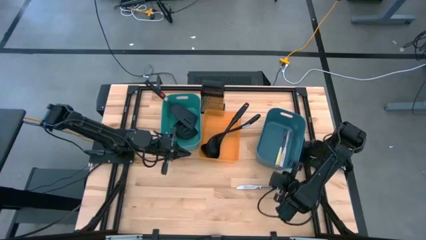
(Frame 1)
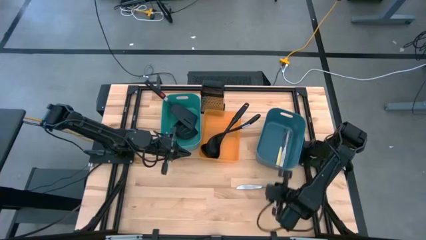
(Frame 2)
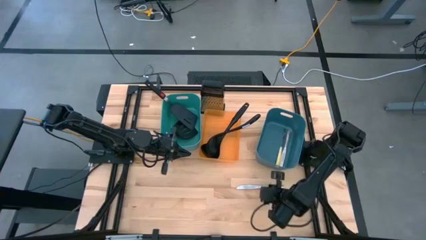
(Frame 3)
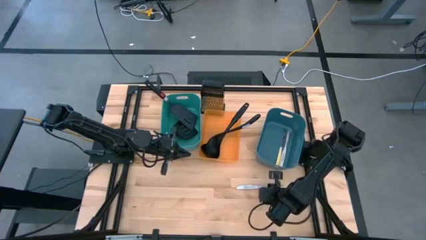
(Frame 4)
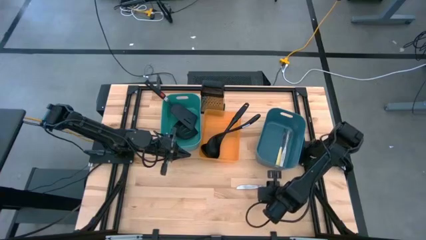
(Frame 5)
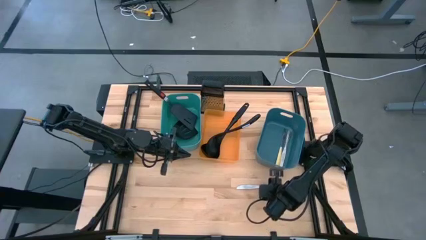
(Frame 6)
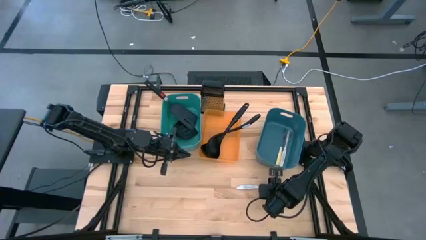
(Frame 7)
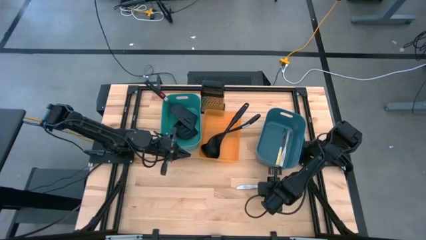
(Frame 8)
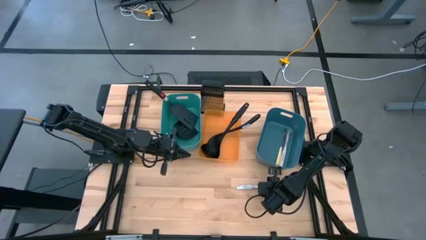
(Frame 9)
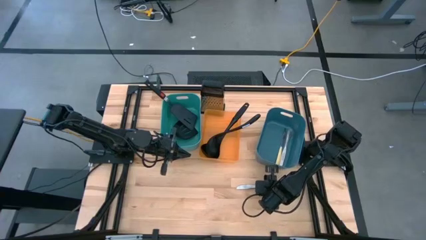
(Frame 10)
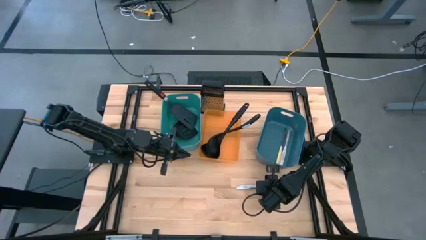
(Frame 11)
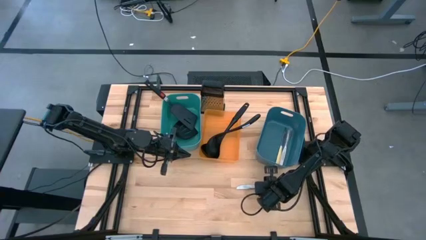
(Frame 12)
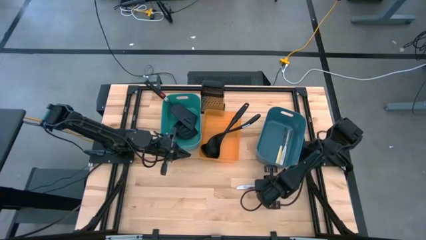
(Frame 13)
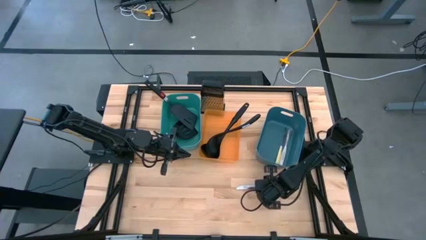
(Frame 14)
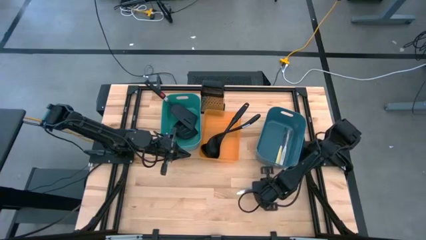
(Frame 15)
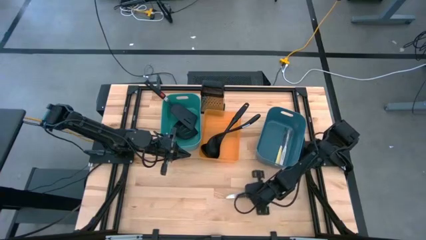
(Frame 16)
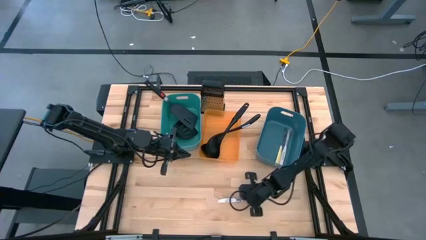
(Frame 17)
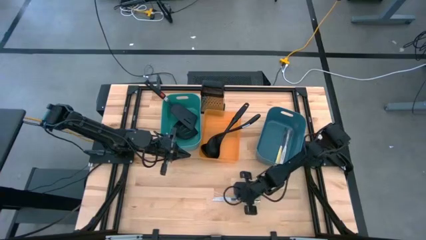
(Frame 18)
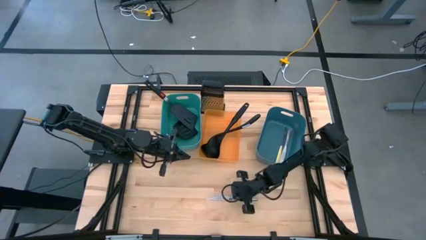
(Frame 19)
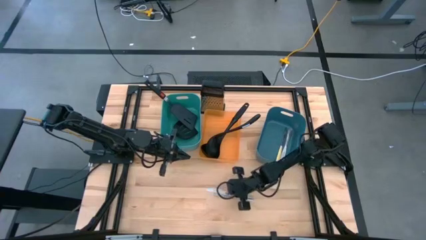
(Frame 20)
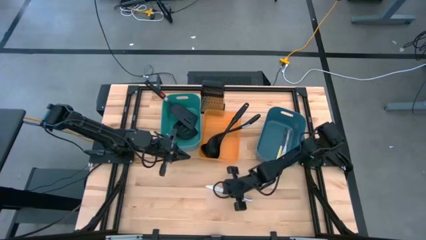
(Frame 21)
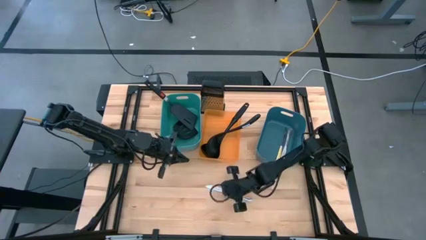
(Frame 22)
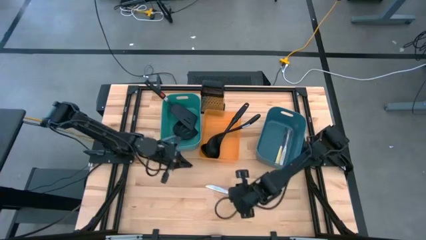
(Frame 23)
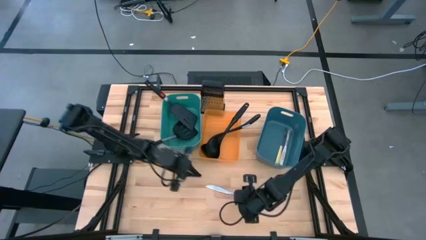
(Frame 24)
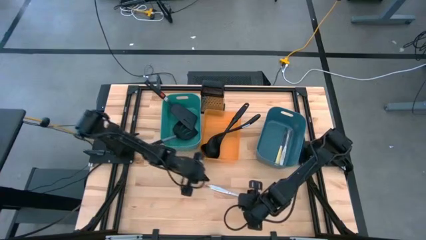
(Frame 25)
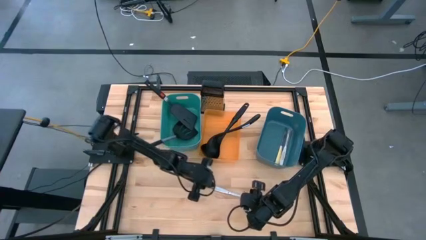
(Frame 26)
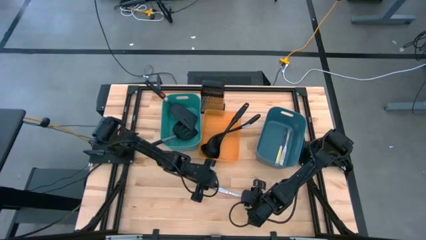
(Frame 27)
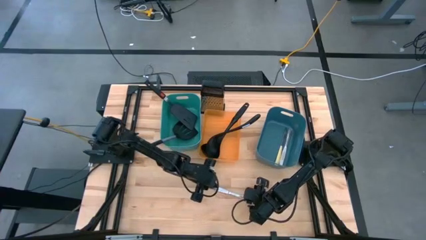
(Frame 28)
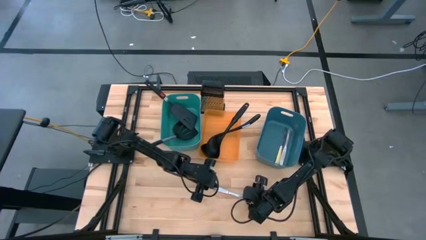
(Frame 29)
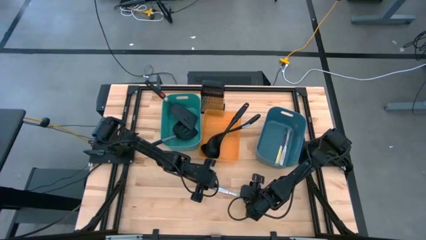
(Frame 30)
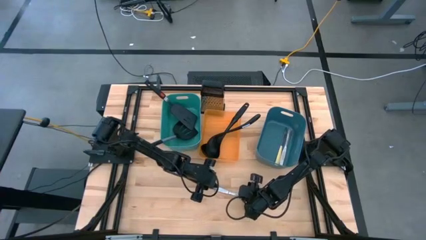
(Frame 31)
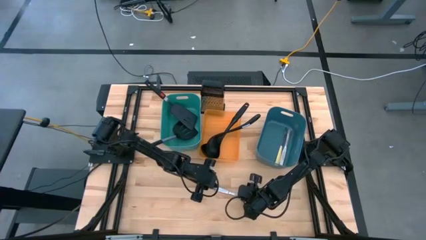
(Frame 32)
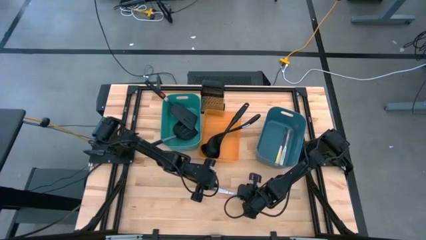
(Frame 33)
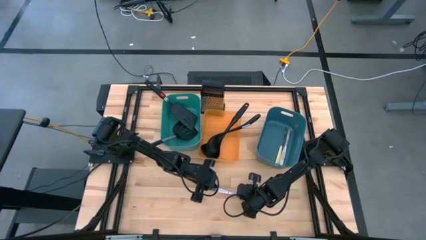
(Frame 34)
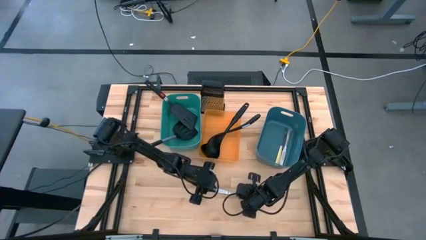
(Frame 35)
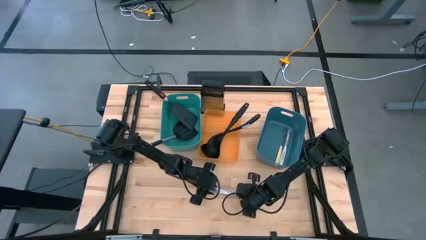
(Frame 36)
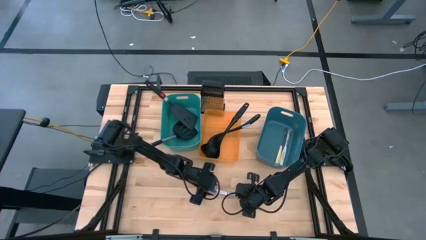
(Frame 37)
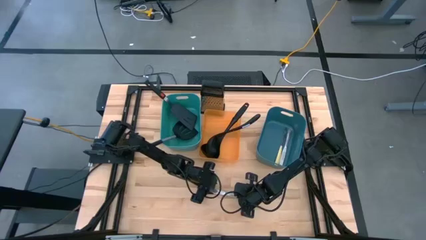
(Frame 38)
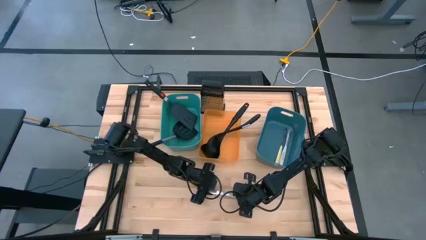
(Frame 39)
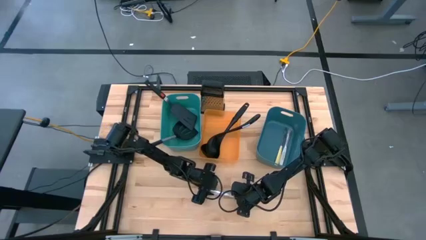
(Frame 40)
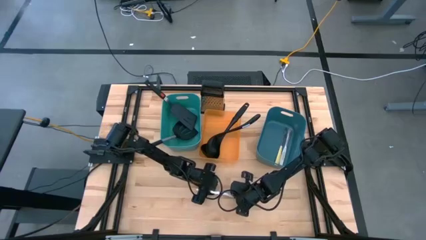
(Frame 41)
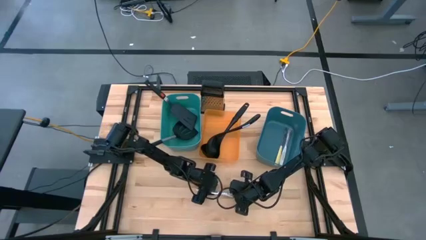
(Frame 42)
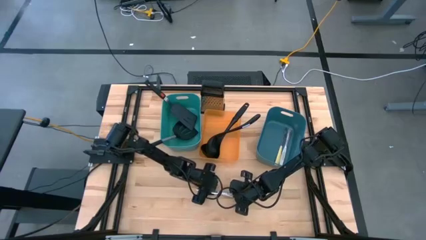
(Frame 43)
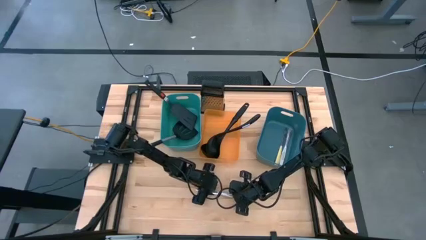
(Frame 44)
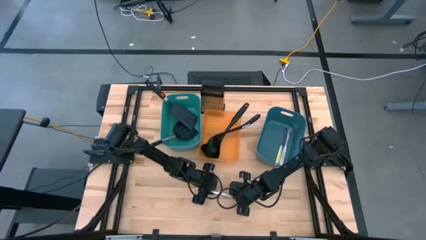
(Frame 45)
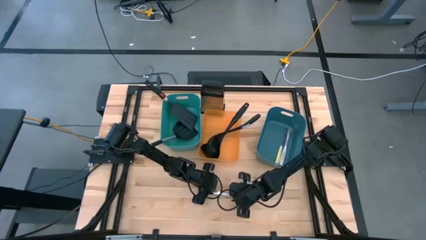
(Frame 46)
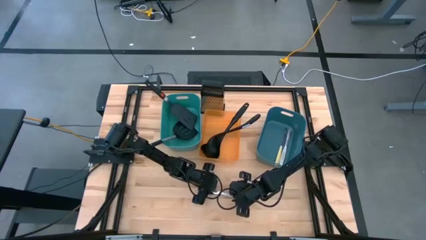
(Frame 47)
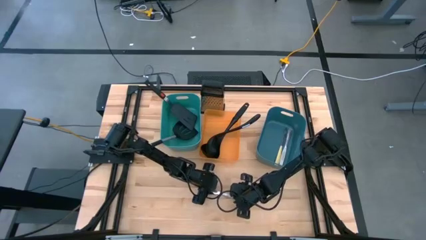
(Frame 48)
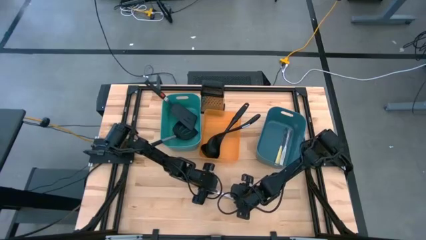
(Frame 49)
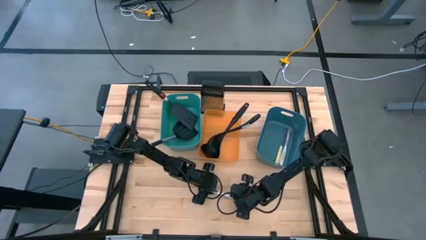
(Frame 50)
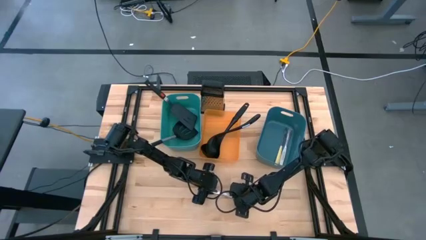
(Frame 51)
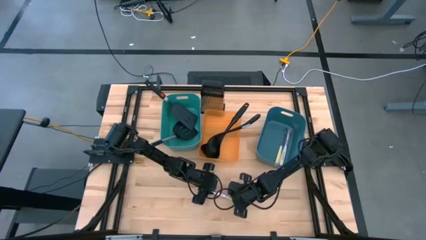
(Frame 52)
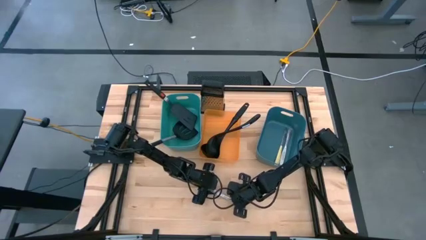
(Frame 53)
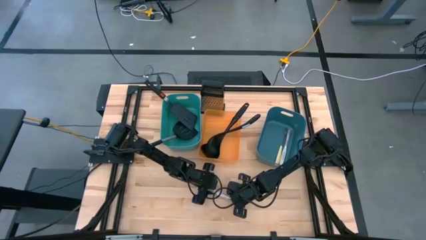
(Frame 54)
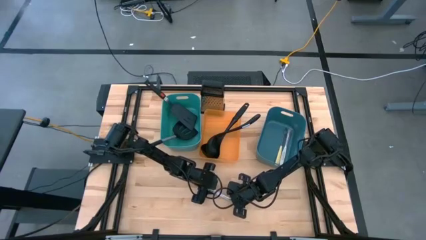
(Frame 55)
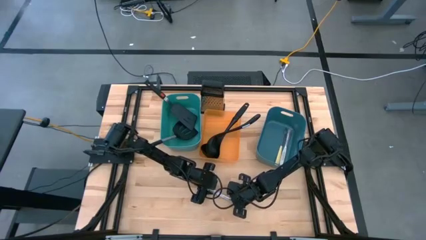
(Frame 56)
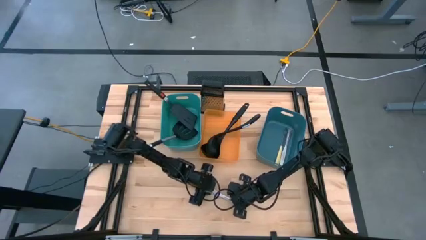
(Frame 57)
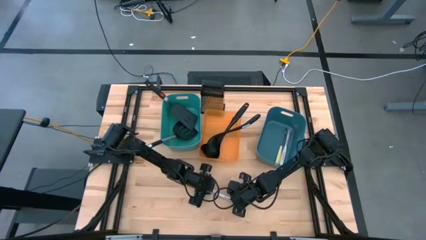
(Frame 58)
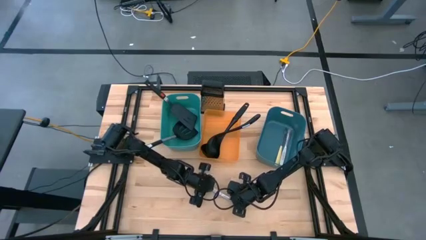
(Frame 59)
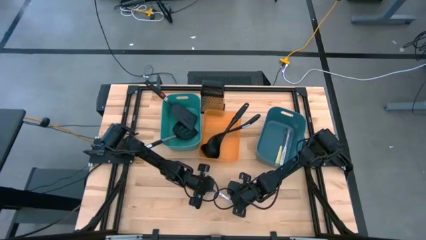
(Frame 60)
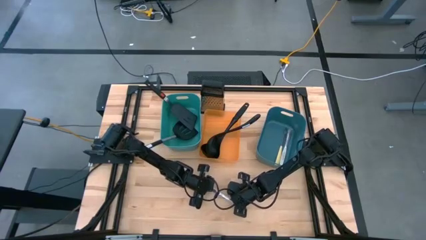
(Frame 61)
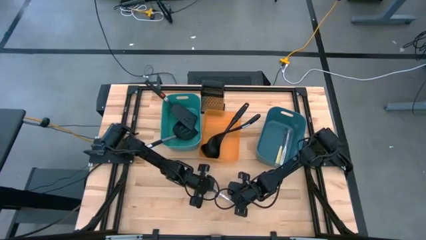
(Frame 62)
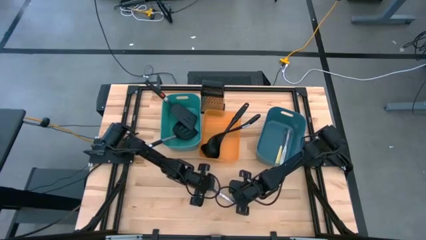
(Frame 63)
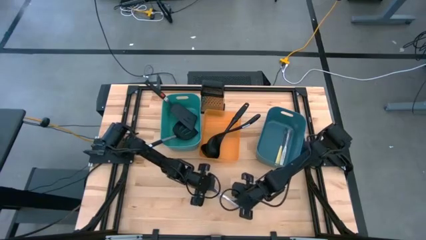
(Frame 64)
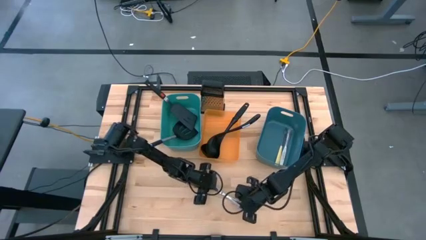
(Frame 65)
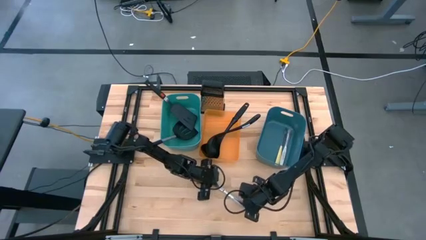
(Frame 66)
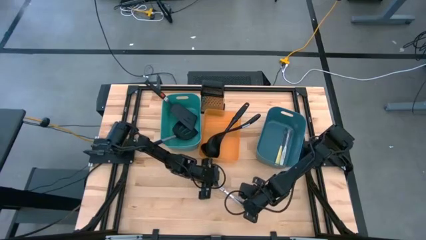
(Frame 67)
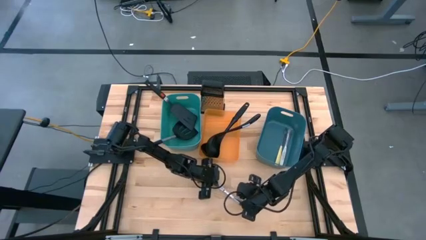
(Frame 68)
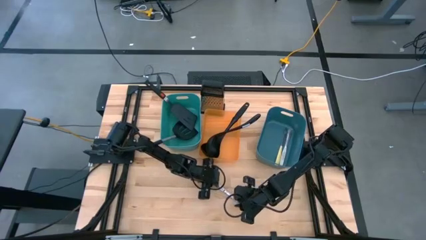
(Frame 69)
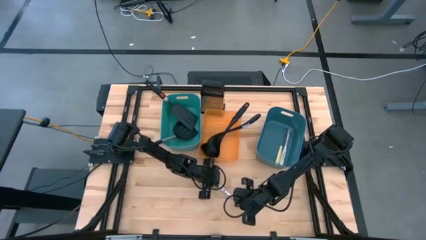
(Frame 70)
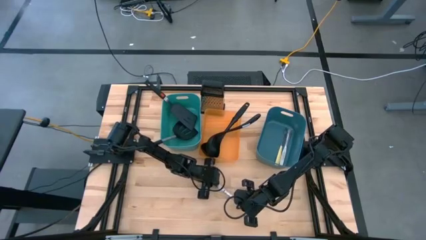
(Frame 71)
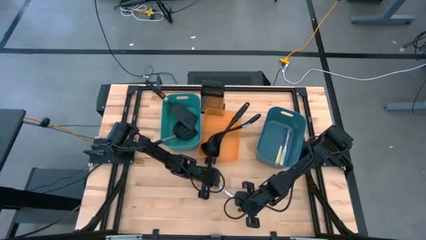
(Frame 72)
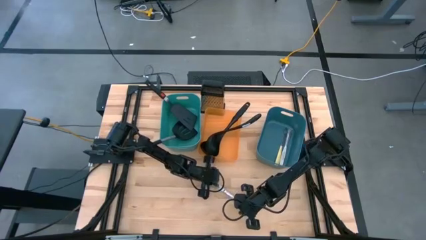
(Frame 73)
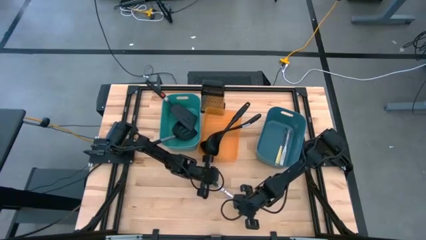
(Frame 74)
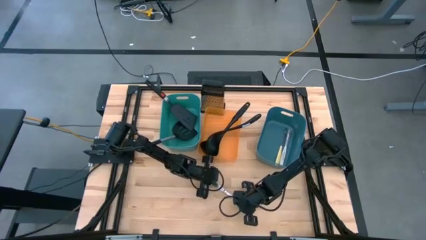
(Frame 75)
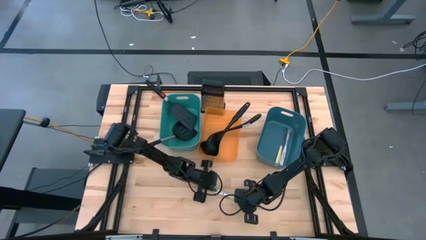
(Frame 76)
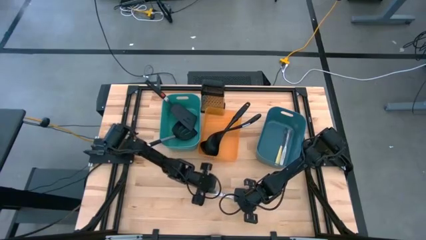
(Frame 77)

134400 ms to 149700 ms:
Task: Pick & Place Kitchen Items
Put the silver table knife into the blue bin

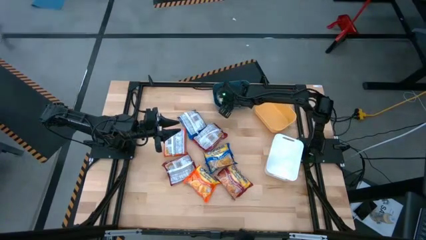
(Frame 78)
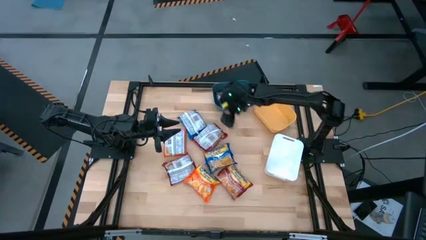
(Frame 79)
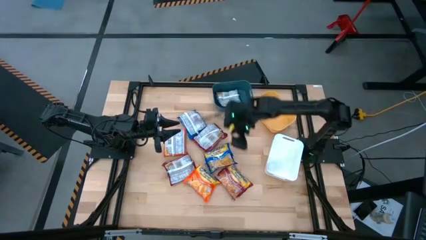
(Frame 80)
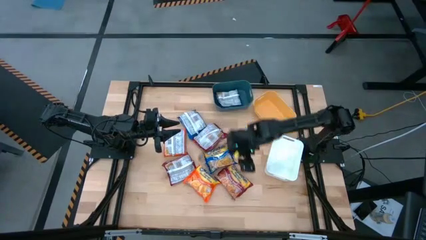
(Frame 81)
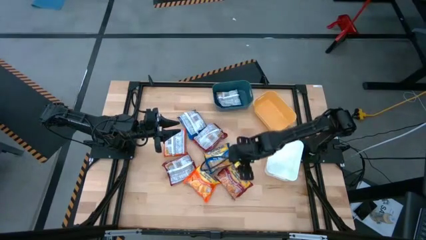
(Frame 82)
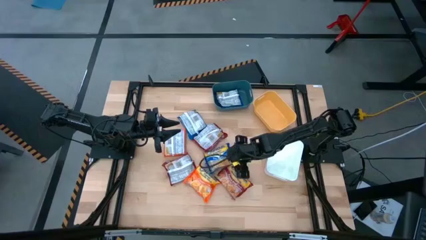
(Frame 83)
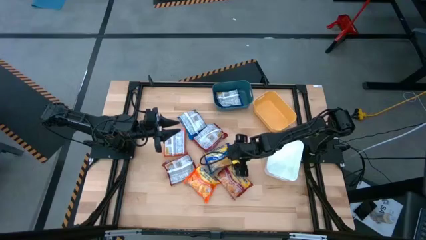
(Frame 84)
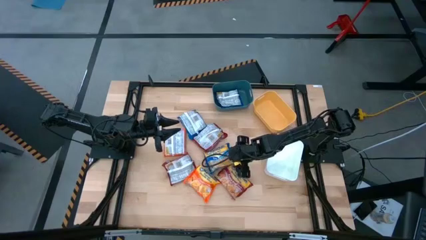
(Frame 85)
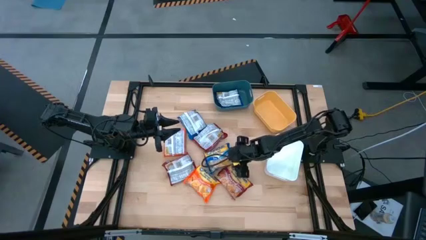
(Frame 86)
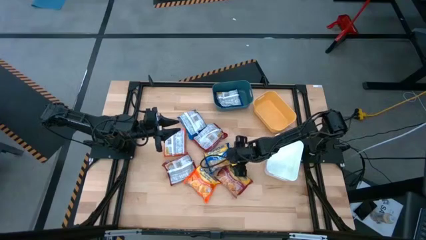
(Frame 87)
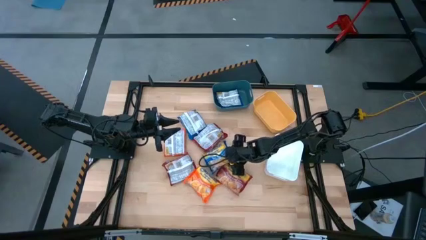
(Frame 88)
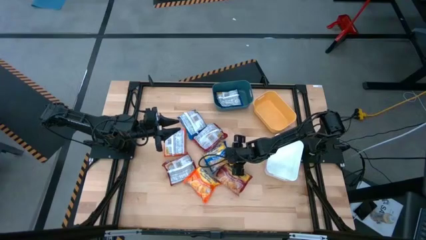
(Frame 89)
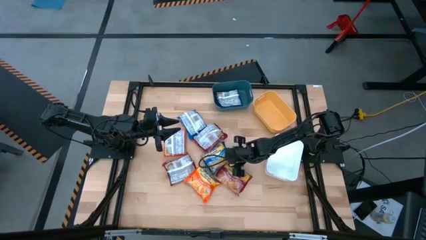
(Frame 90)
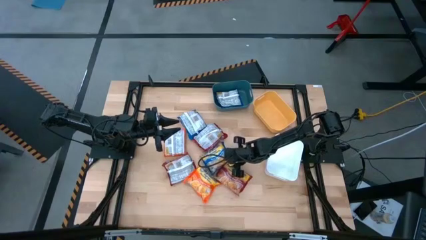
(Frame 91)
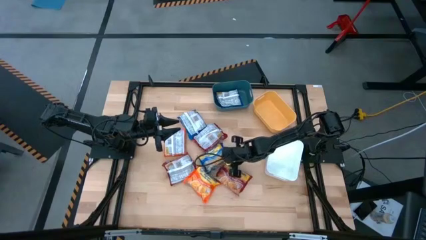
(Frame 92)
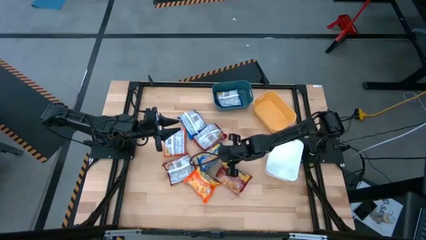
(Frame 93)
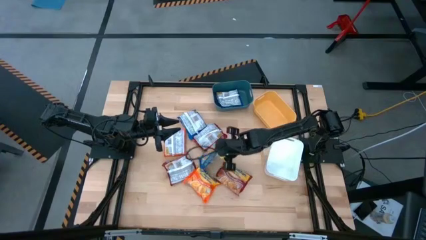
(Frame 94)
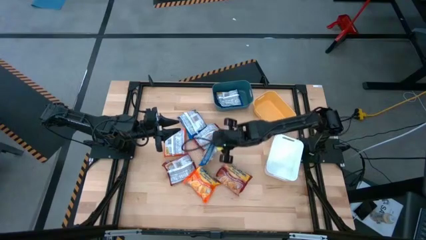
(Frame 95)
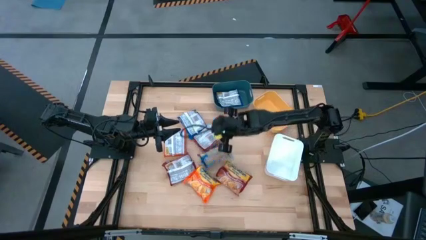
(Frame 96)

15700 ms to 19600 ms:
Task: Sort Maruchan noodles
Put the bottom blue noodle pack into the blue bin
